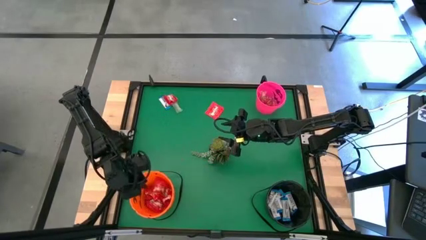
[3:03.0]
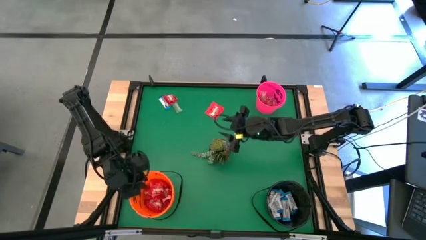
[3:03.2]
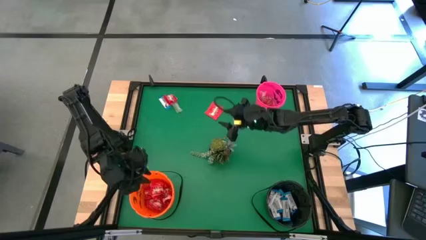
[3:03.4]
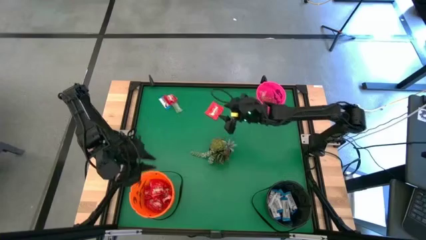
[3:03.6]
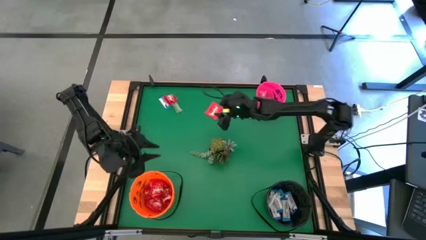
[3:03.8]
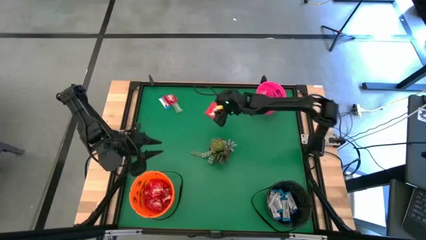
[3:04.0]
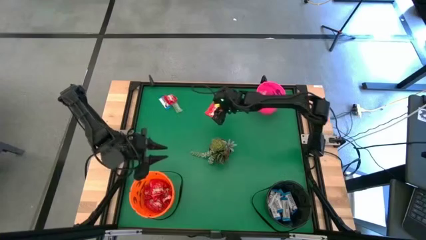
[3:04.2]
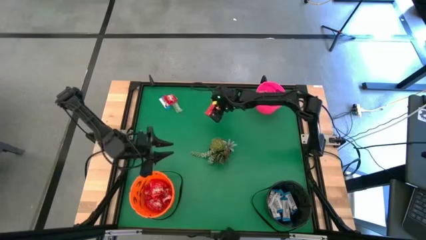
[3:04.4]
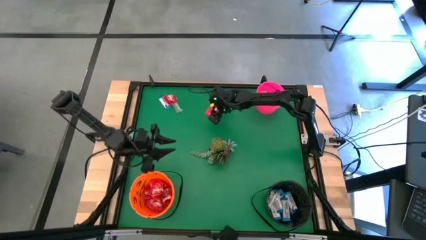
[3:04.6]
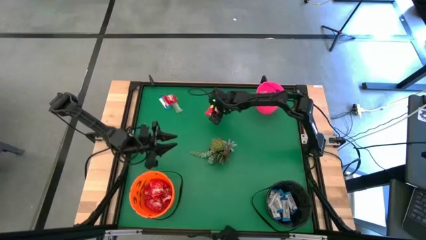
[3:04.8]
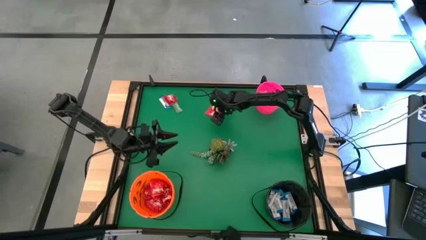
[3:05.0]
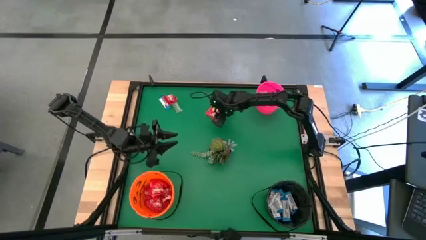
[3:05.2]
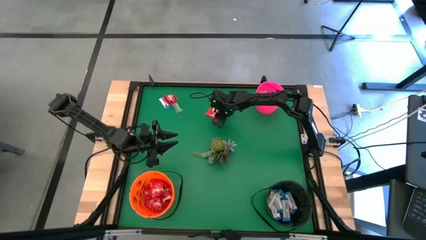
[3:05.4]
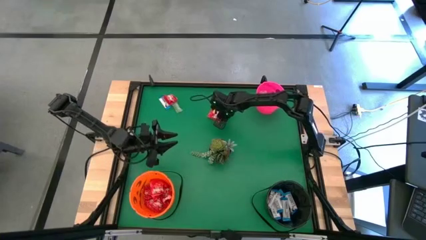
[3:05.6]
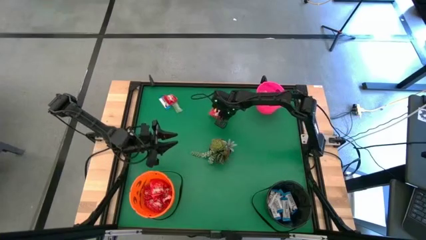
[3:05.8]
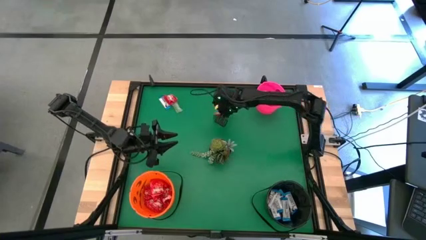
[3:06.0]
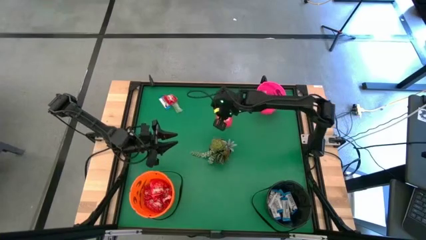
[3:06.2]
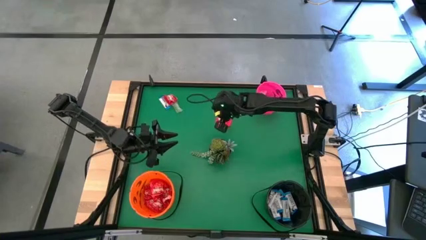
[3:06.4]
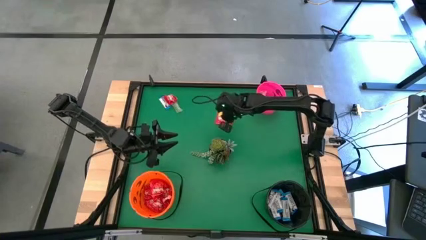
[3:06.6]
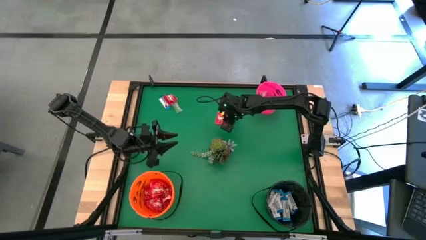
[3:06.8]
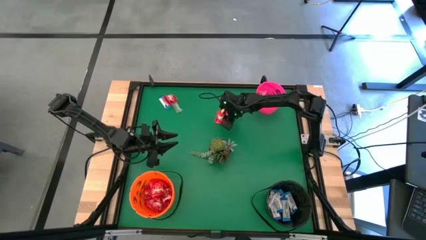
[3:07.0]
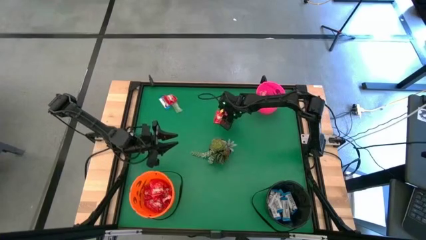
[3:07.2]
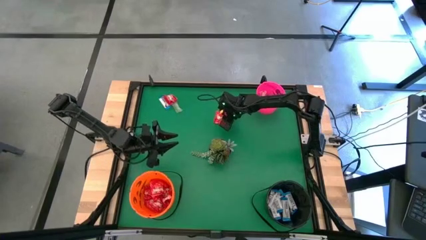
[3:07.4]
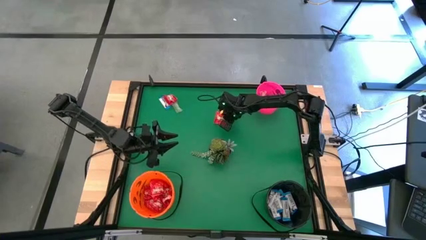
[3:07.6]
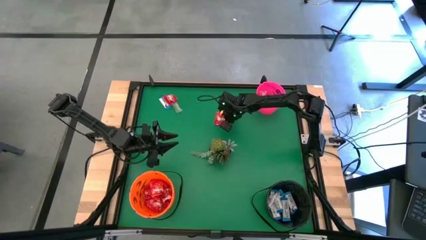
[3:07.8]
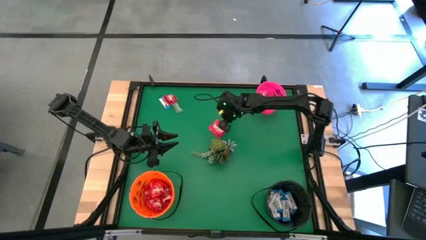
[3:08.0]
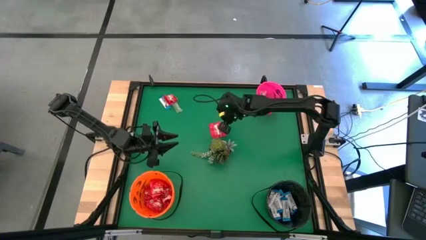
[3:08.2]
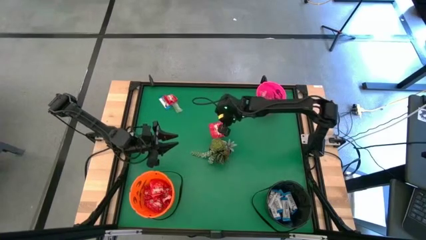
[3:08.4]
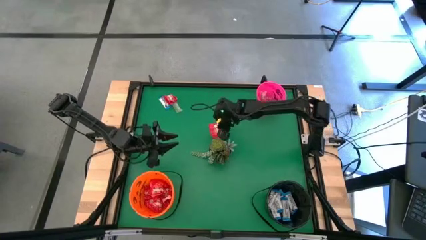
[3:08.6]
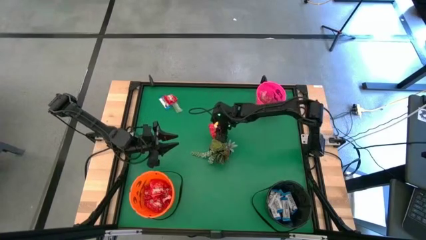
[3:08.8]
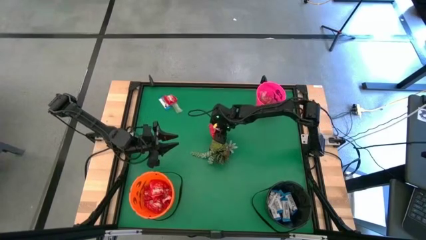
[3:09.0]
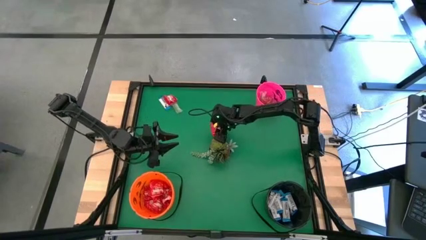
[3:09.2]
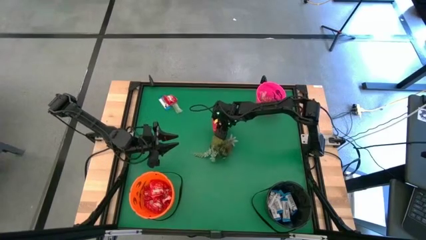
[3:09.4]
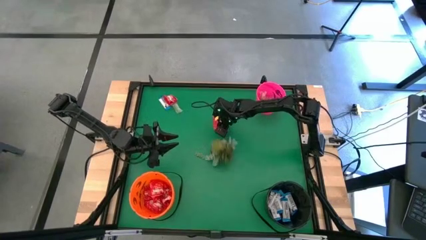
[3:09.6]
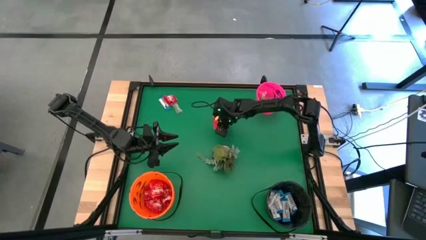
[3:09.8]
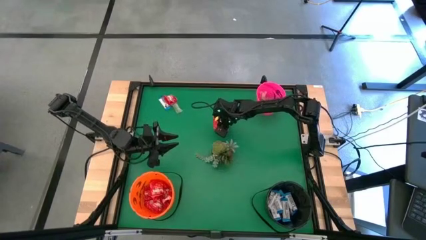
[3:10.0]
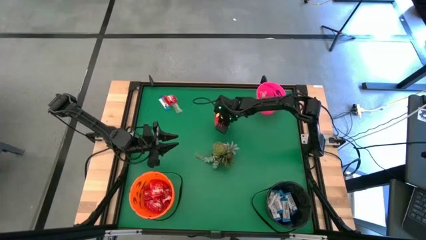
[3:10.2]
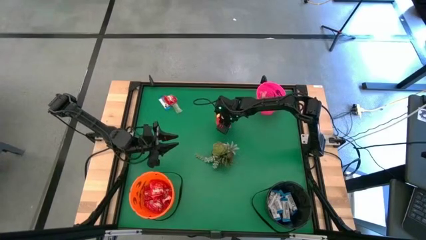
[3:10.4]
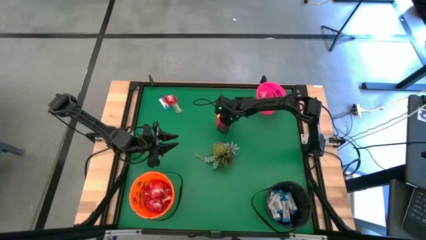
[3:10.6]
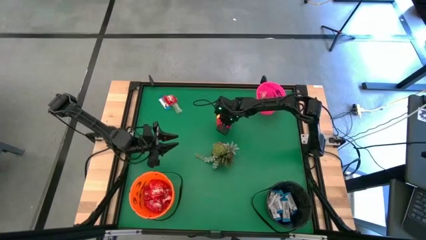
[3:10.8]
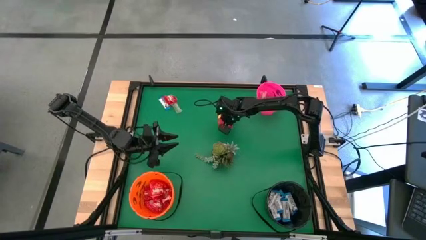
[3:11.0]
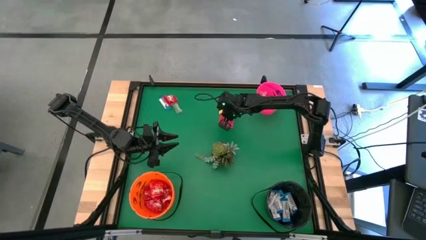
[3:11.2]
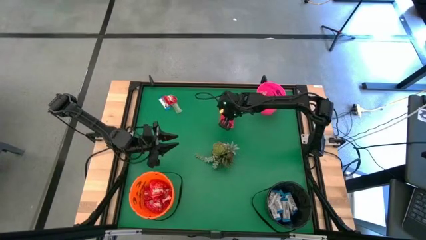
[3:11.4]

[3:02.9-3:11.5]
Task: Sort candy
Put the red candy into the orange bucket

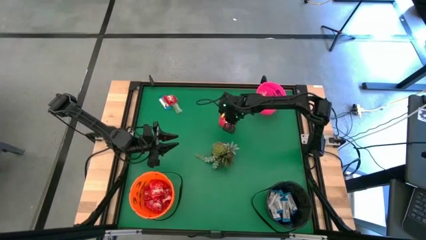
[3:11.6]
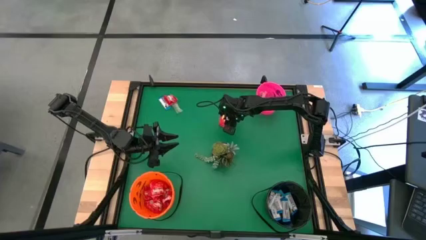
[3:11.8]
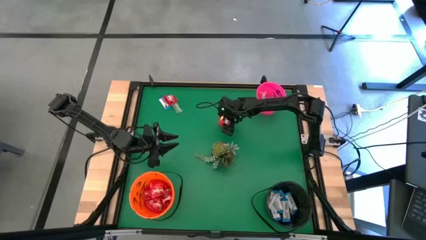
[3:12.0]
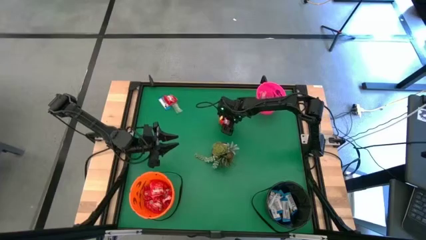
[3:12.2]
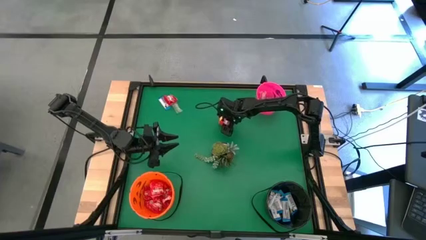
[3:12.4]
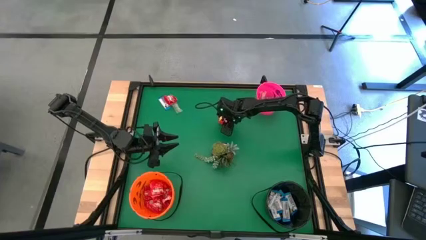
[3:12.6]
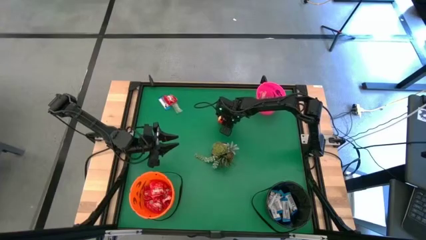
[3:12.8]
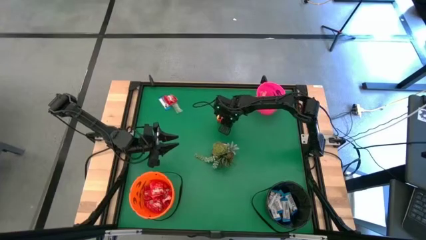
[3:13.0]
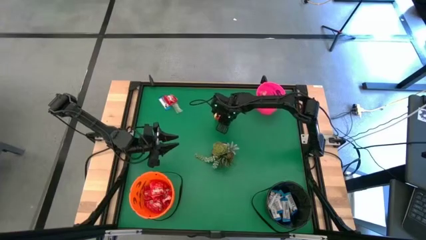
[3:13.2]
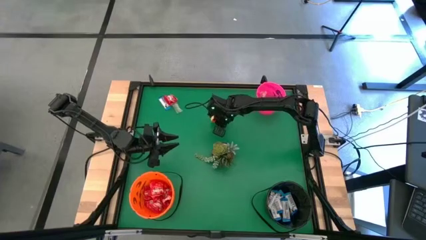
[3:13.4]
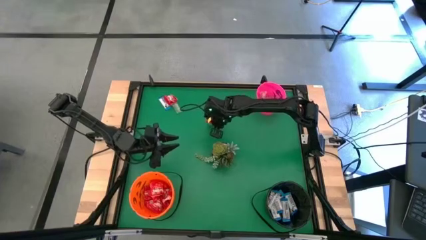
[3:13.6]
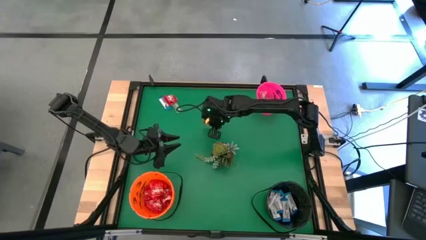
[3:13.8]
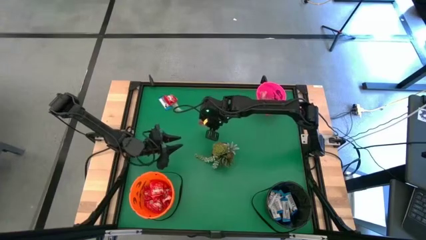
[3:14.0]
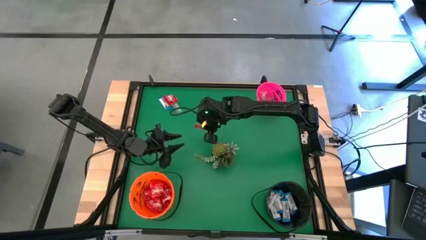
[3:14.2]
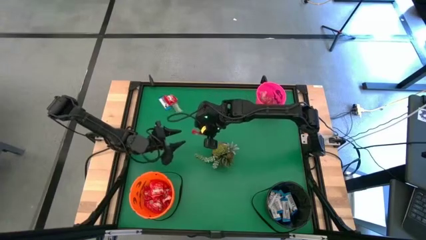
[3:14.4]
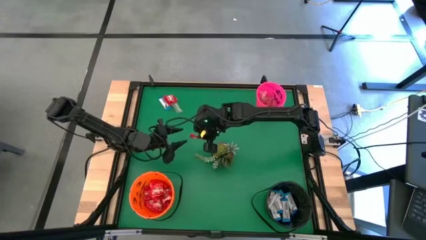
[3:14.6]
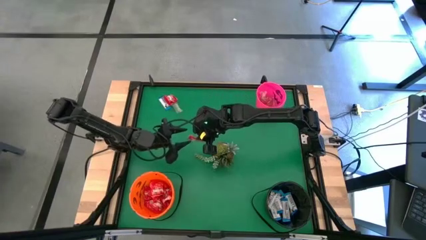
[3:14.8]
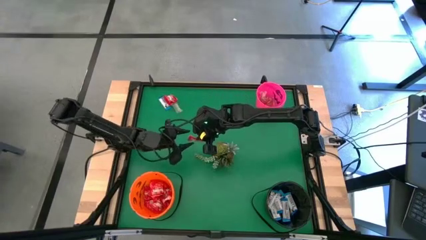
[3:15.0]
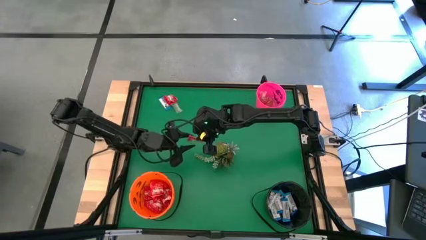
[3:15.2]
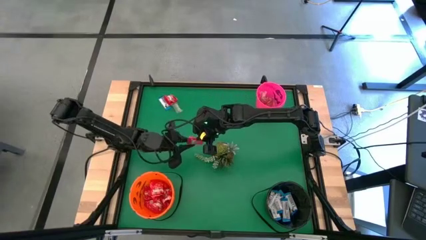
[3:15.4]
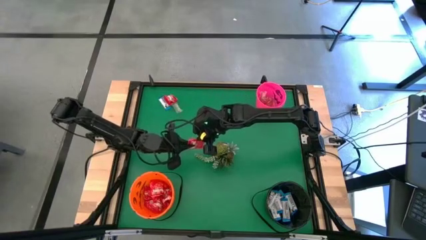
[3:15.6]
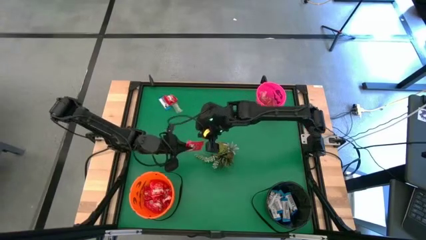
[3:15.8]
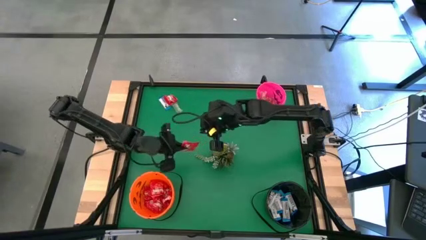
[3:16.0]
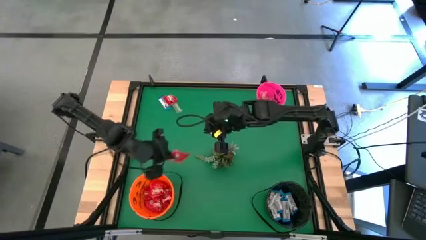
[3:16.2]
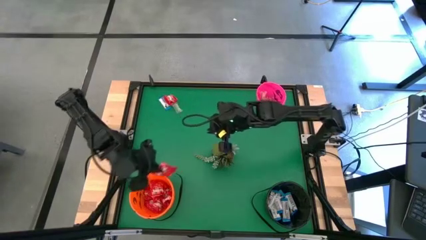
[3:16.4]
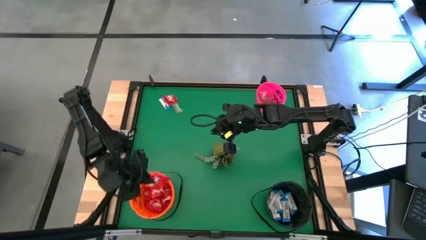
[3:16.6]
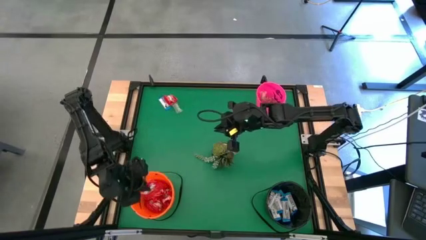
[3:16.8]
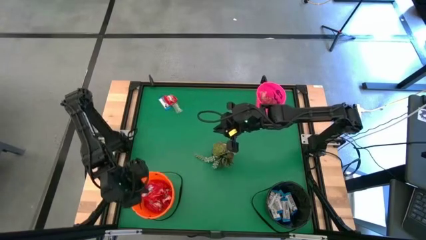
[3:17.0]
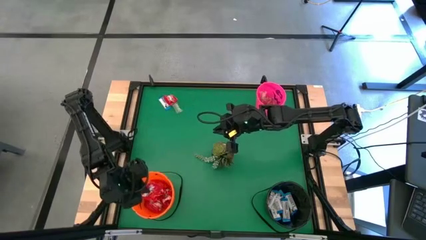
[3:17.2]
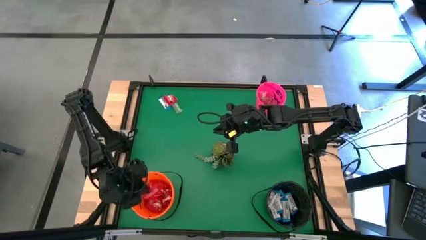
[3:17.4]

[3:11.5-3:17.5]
Put the red candy into the orange bucket

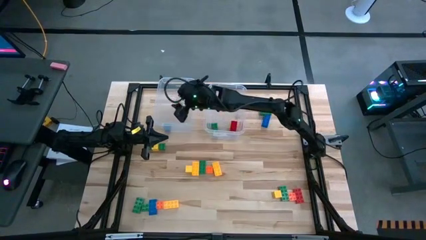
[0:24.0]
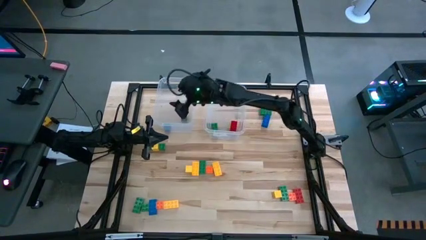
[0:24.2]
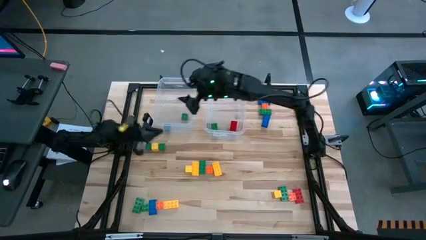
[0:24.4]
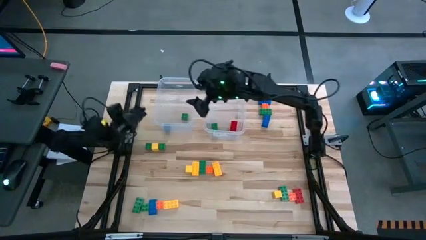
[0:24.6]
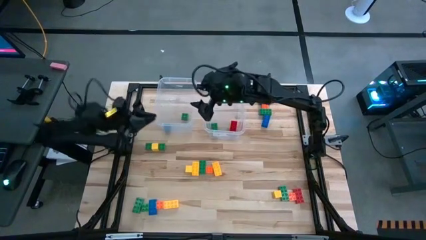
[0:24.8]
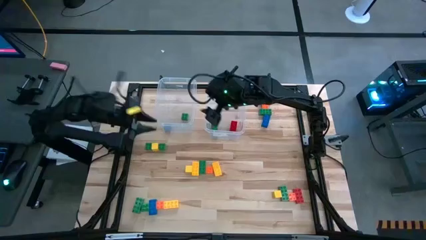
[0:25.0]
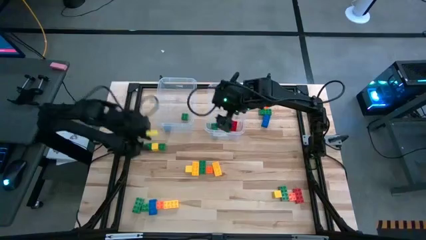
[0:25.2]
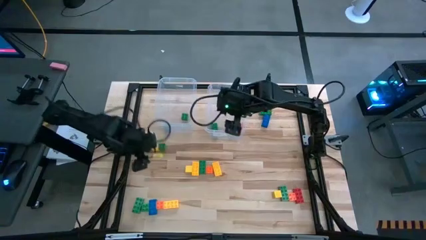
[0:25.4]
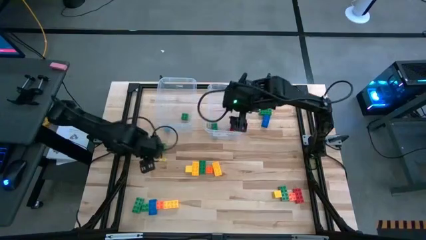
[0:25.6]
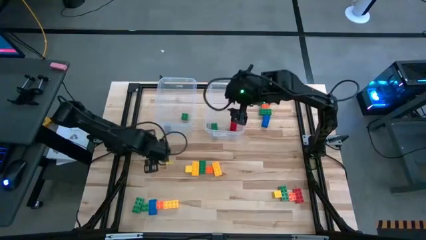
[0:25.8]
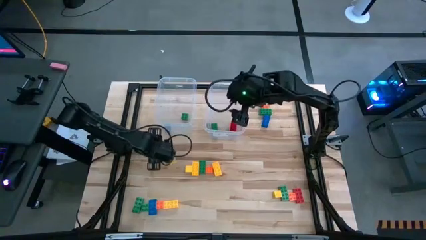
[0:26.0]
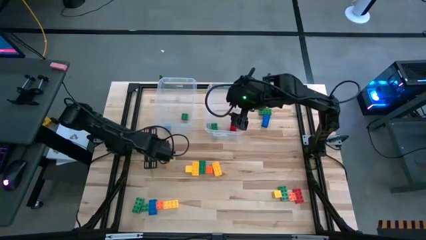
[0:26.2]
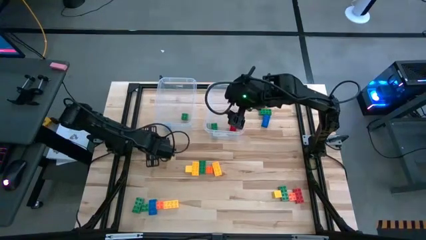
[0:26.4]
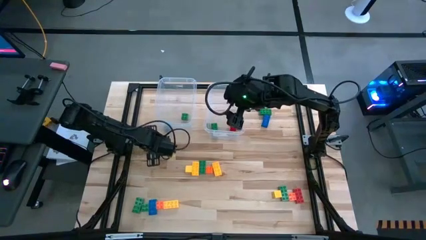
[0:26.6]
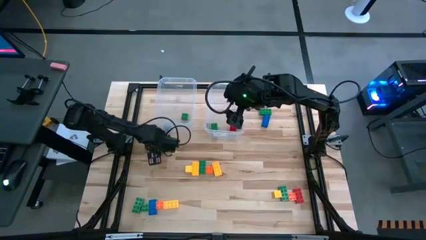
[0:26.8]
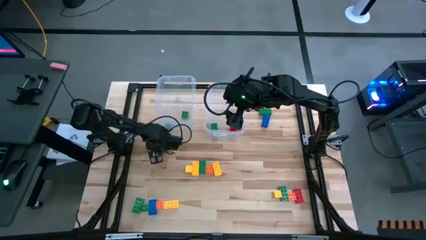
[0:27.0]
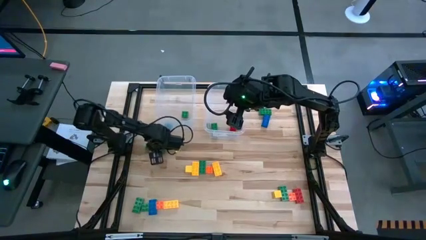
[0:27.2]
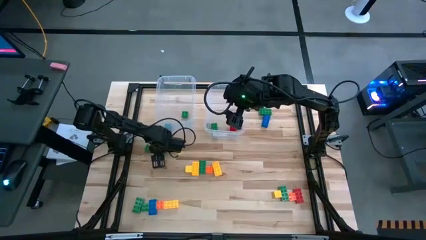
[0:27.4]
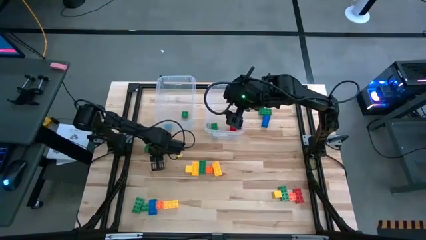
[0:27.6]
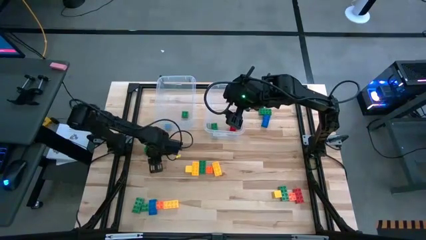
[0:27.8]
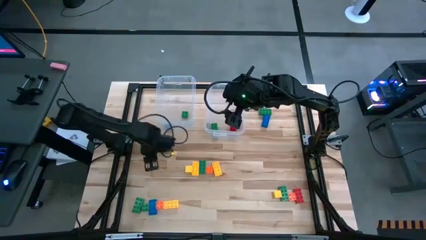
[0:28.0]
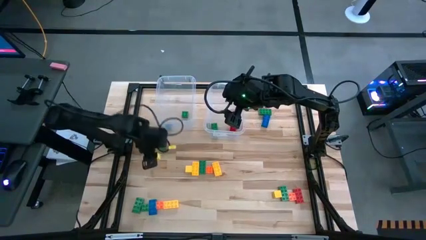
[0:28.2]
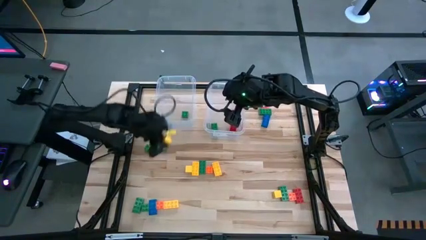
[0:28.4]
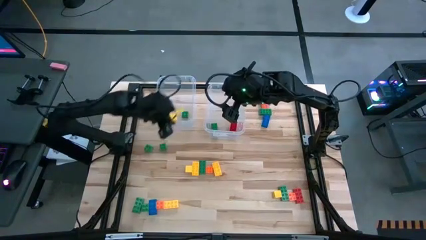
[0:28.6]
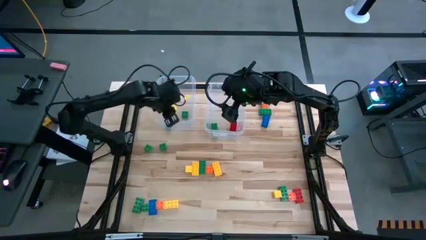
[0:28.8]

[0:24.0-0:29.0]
Task: Sort blocks by size
Put the yellow blocks into the left transparent bin
